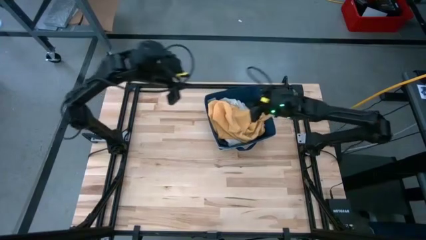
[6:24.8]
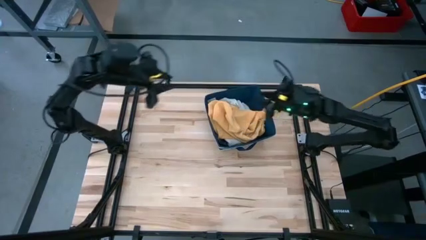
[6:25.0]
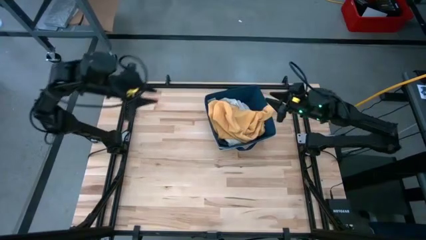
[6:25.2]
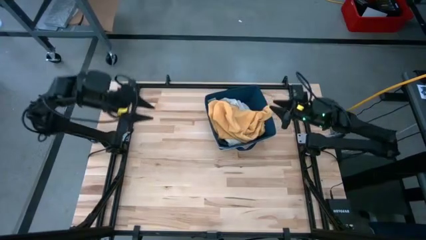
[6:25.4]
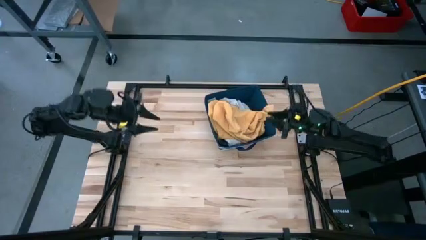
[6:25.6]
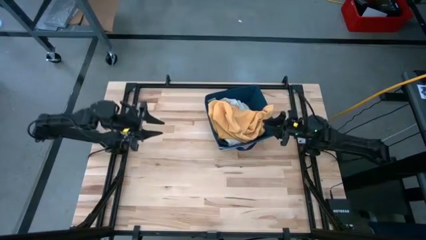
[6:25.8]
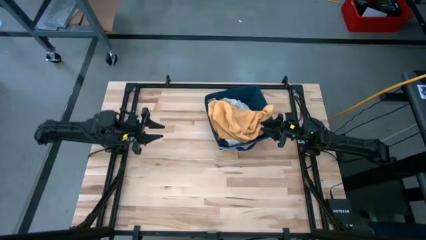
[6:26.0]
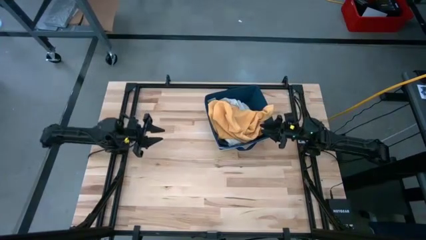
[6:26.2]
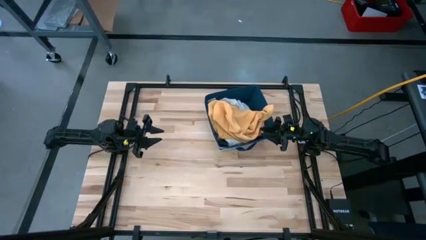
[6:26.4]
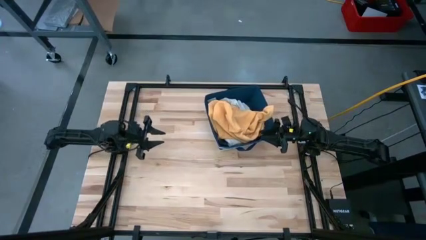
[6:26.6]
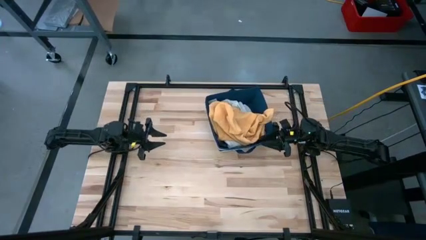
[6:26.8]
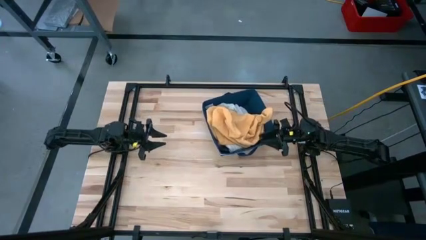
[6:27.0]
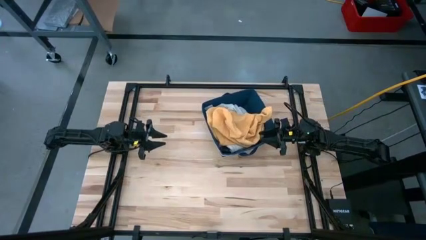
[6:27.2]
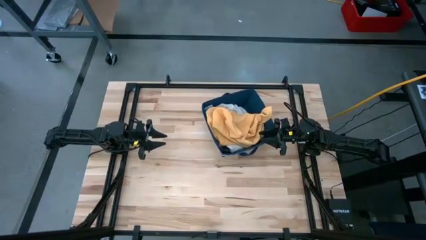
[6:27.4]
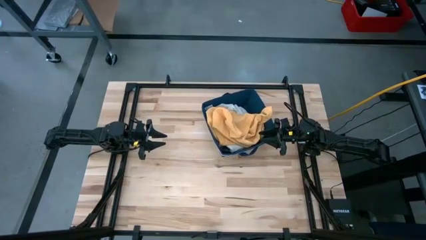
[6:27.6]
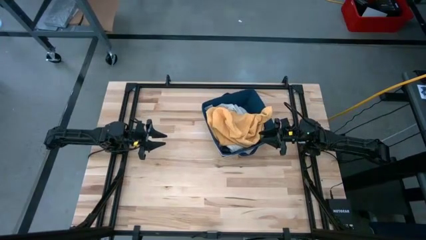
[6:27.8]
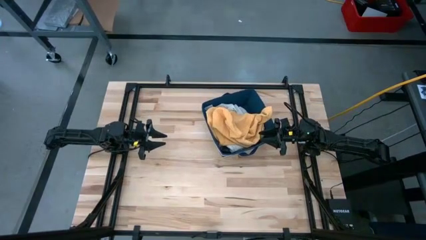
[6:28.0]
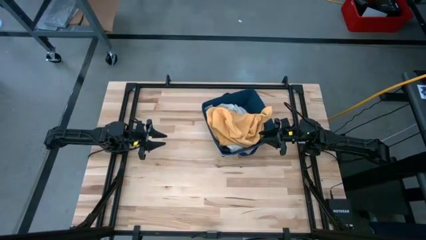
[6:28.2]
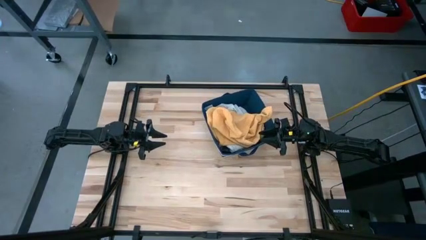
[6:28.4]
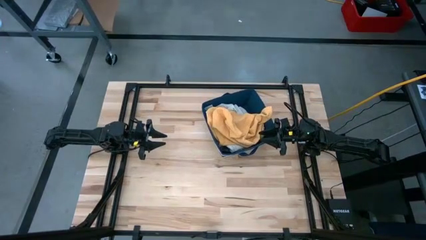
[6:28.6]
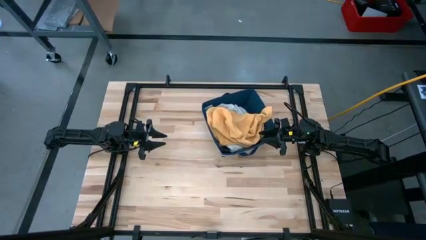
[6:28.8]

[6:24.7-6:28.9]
Task: Fold towel
Return to Home Position

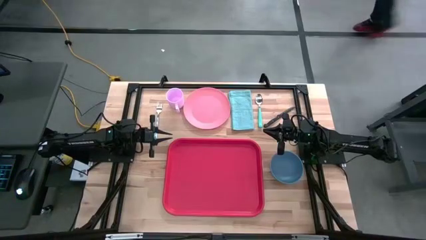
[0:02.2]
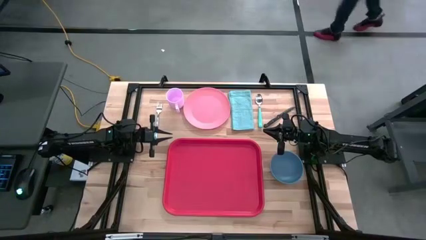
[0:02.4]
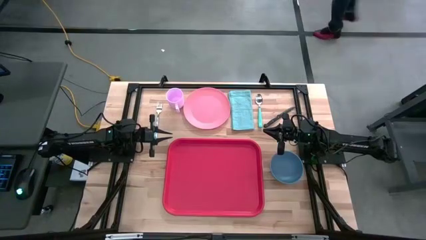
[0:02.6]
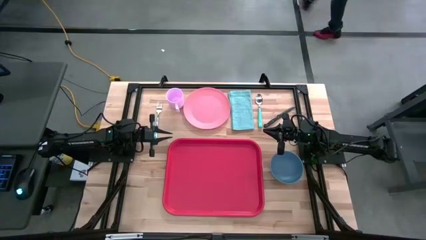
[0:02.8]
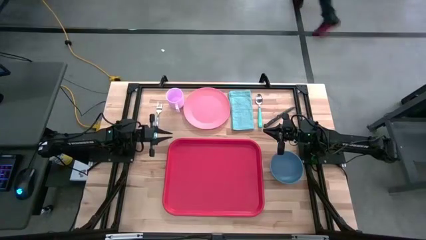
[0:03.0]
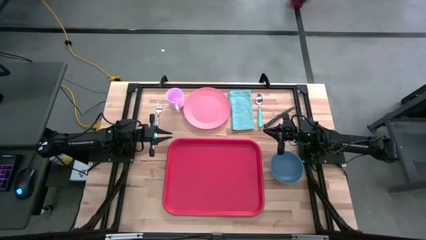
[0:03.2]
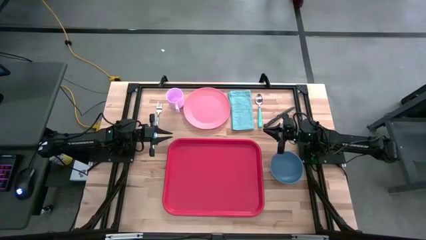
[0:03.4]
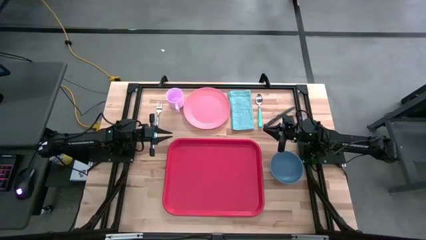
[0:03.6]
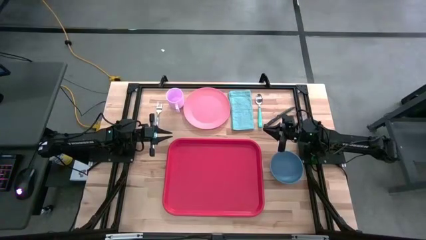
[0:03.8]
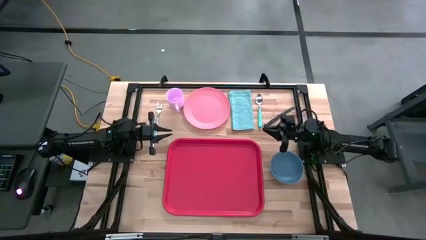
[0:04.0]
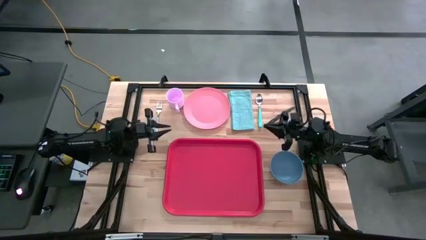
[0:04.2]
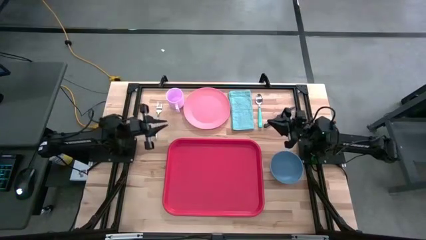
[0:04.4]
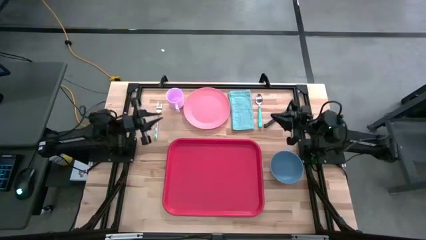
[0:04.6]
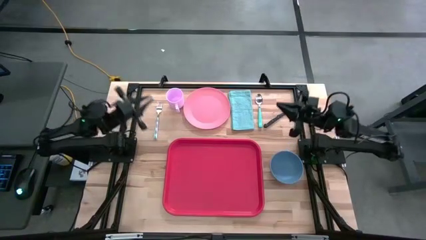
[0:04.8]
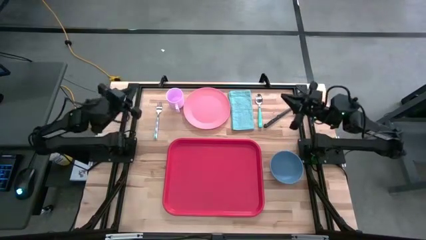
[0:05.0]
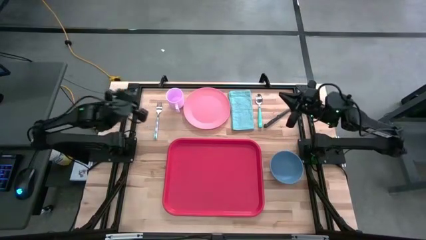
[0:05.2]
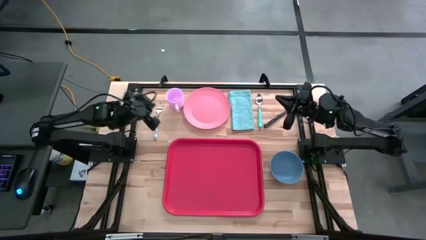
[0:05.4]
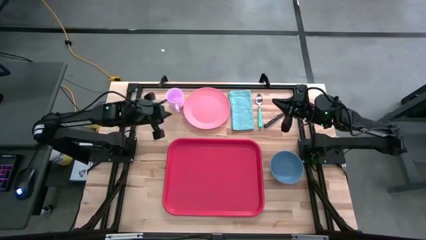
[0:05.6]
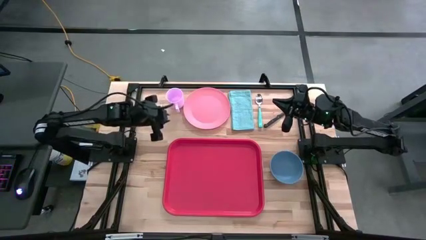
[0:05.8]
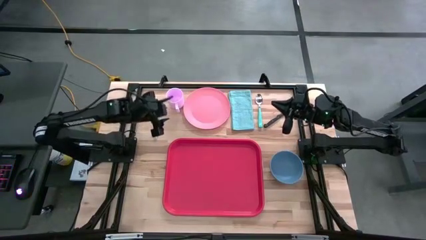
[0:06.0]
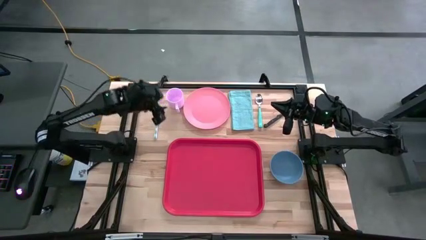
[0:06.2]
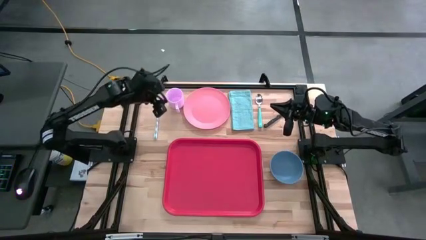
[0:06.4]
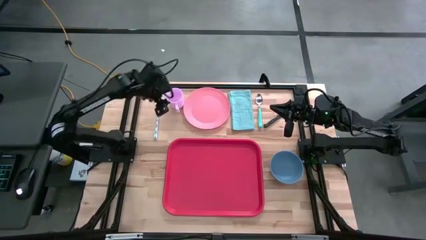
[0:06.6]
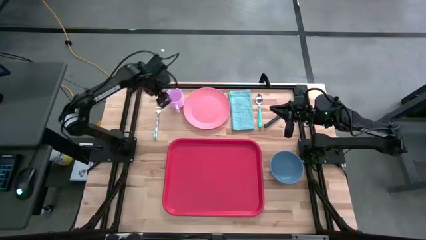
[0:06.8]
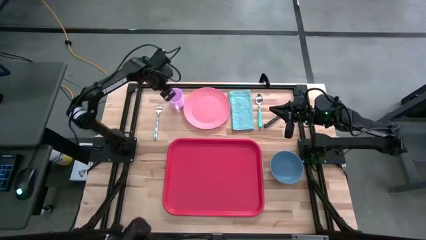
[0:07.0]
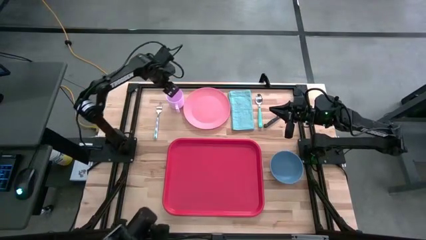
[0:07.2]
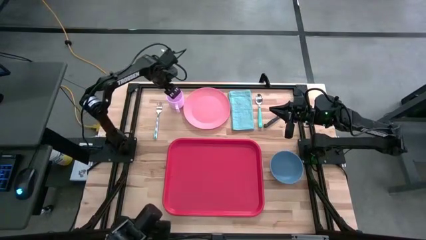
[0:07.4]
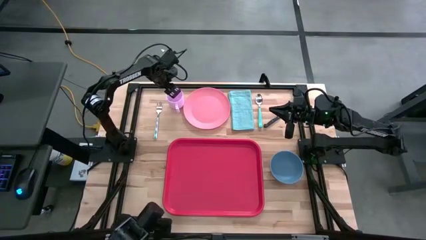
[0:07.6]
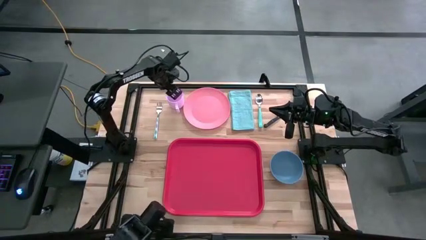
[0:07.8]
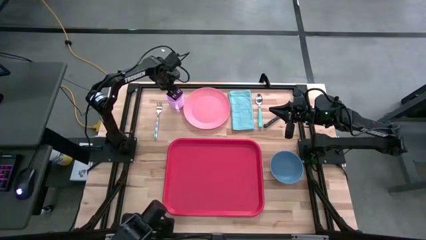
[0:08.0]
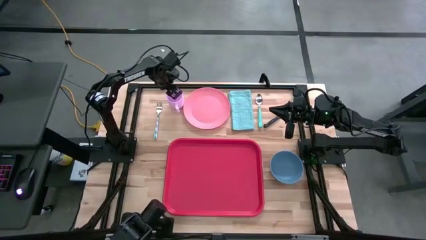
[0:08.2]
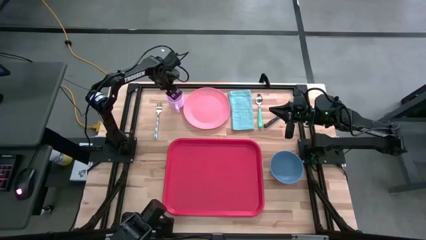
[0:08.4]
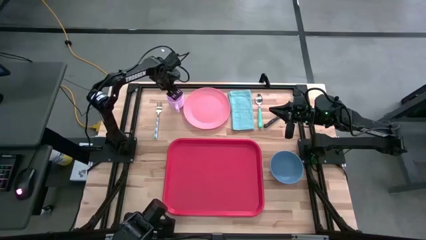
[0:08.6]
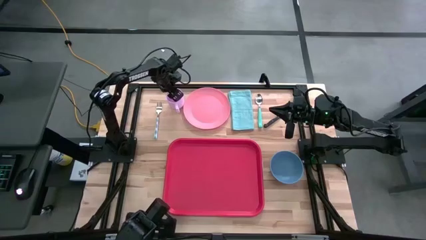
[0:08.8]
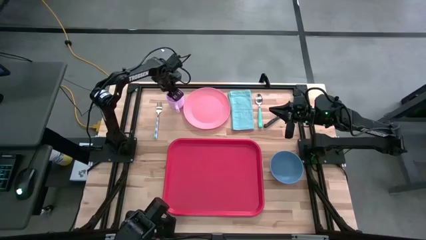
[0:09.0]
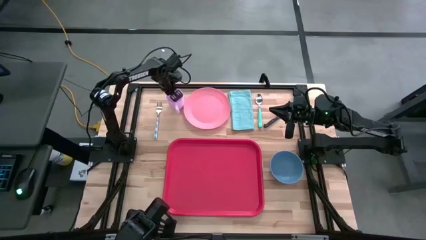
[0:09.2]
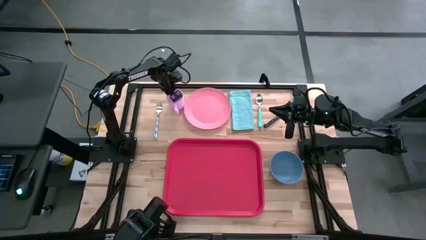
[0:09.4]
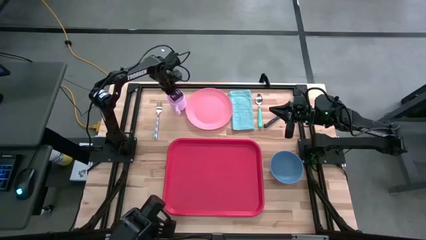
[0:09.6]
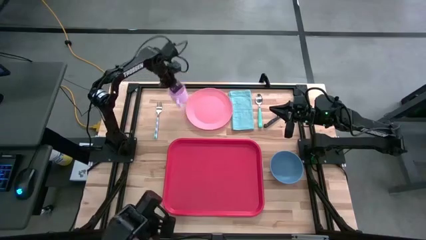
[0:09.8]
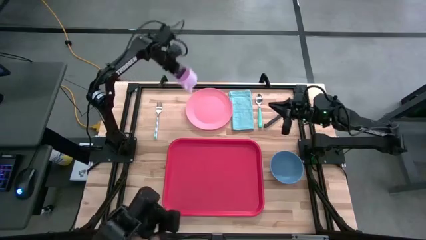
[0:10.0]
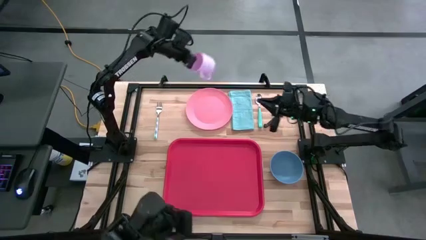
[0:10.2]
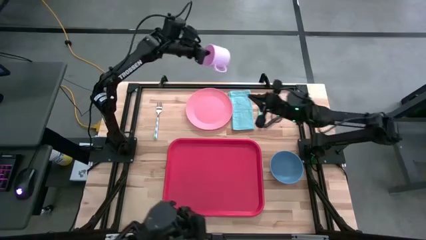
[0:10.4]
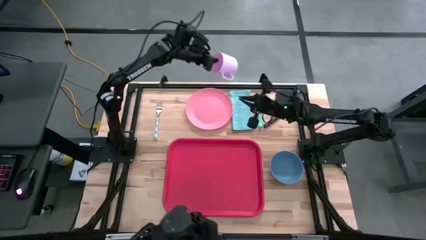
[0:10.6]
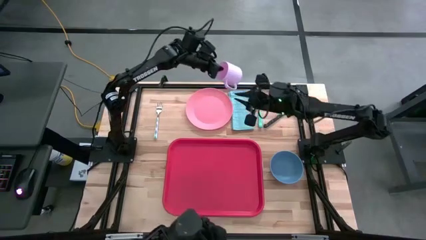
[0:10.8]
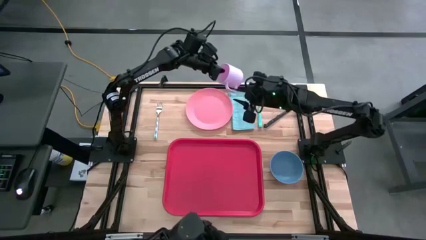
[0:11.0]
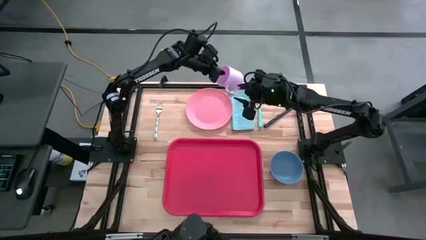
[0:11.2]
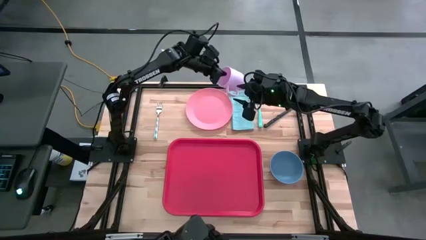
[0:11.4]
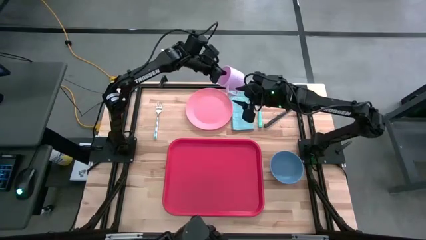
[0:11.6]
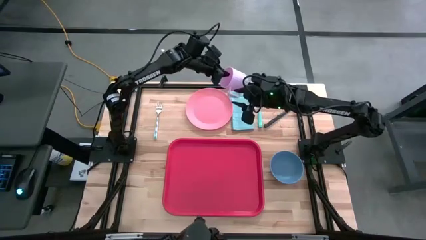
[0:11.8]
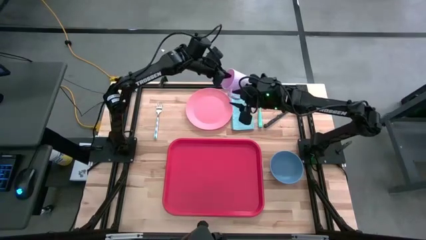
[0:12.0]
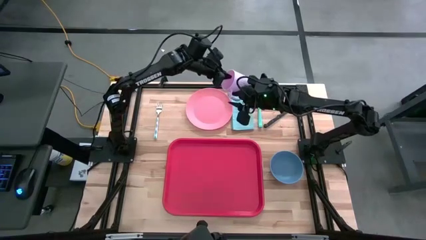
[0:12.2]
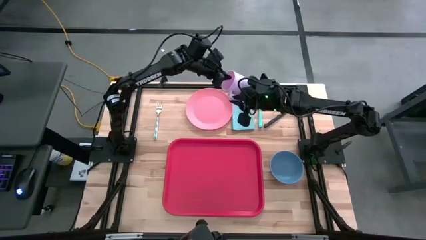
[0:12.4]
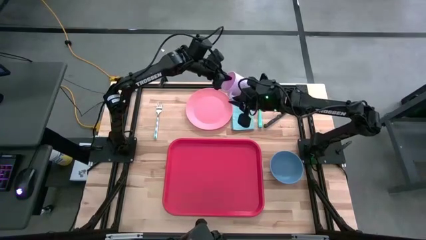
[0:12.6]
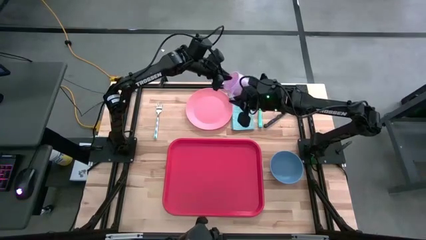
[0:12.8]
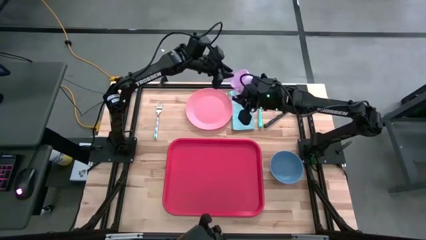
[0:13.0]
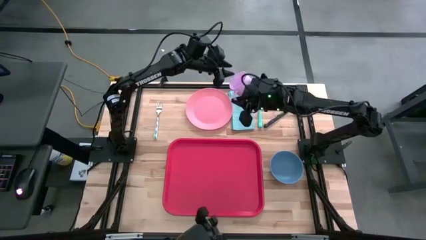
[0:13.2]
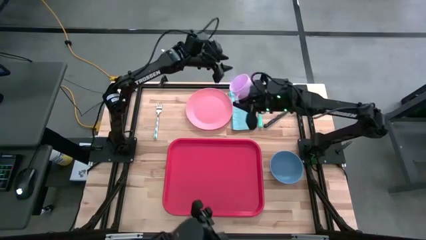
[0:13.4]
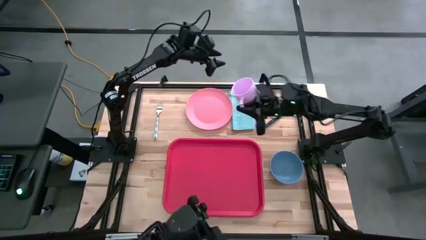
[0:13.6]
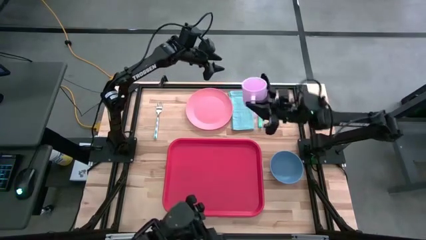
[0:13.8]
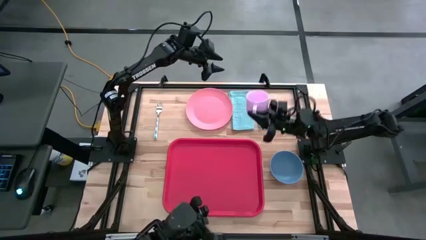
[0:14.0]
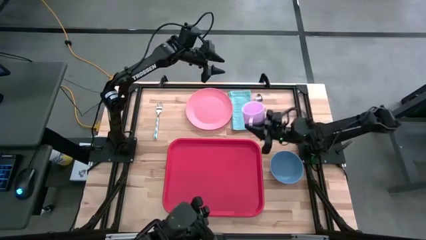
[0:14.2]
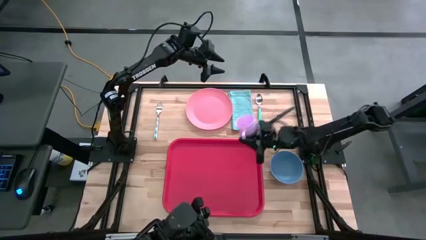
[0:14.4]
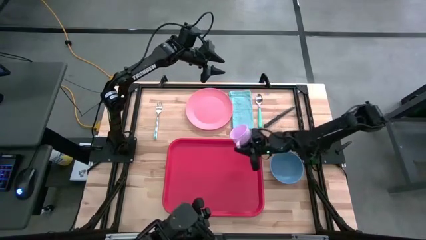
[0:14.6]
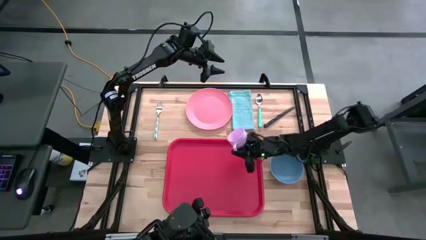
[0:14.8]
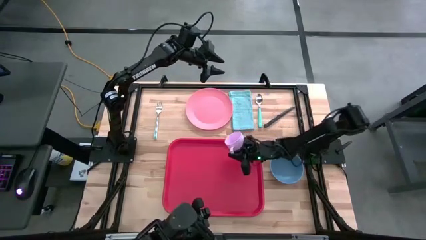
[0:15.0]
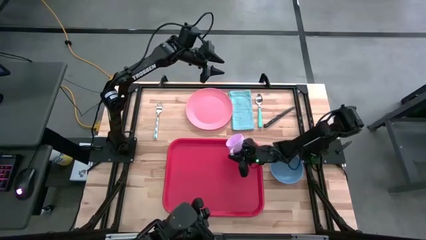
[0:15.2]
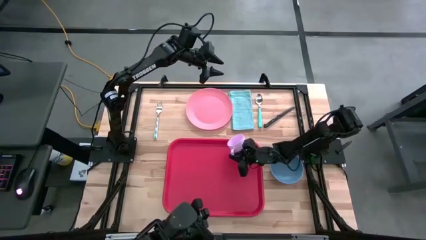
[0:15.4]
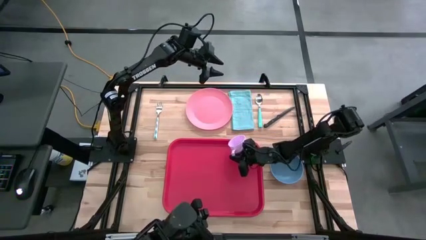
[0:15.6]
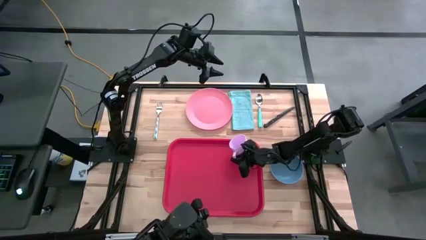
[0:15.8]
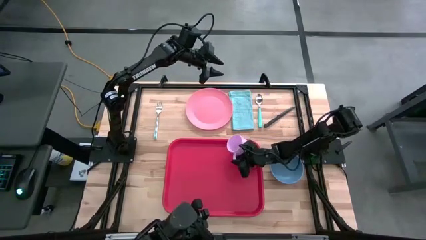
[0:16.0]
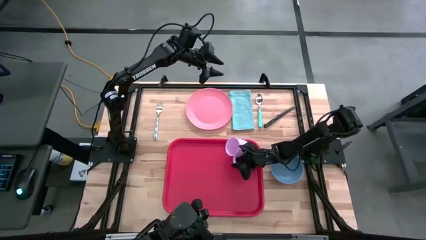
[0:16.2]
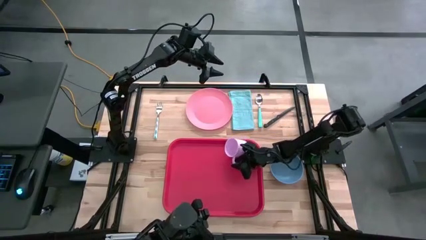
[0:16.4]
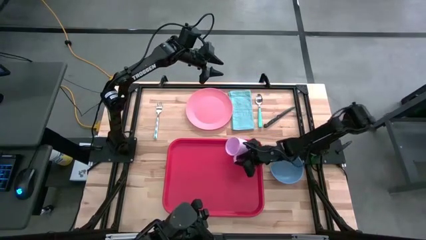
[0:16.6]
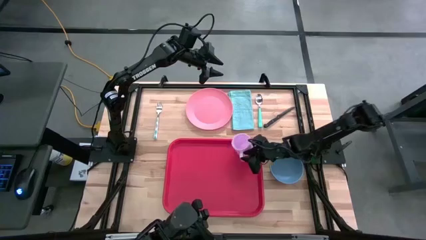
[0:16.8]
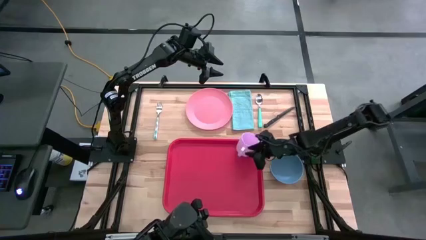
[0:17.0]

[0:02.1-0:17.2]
Task: Set up tray
Put the pink mug on the red serving tray
